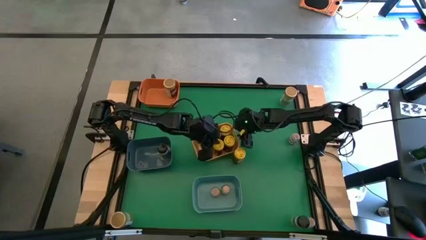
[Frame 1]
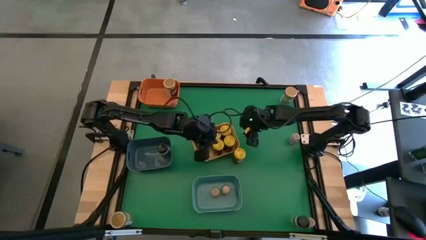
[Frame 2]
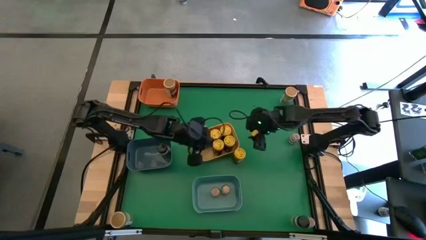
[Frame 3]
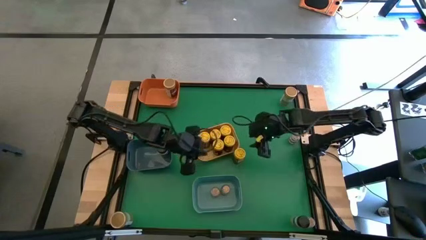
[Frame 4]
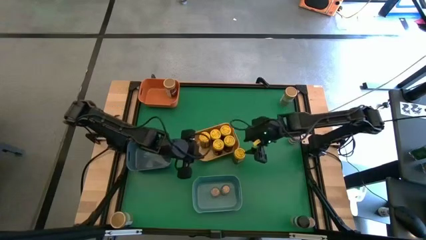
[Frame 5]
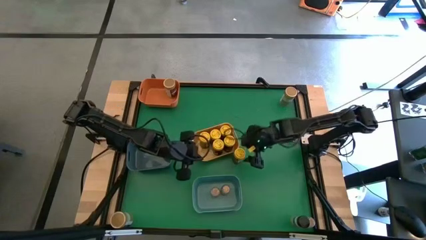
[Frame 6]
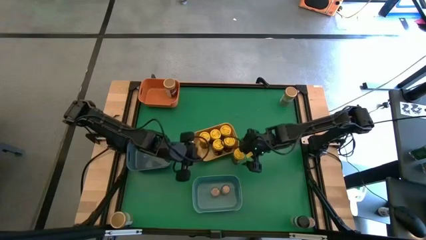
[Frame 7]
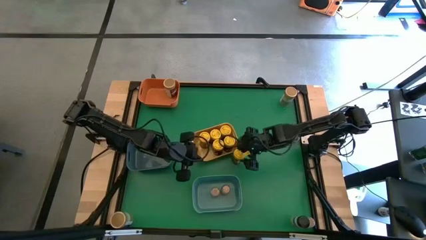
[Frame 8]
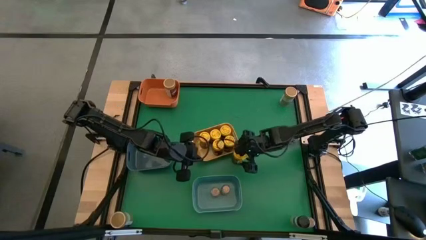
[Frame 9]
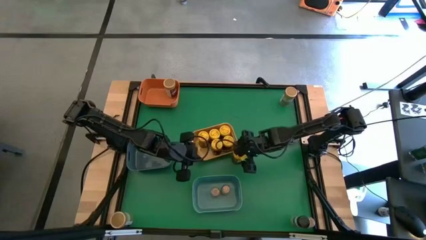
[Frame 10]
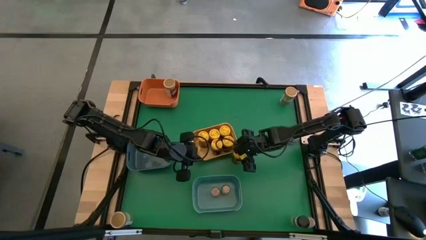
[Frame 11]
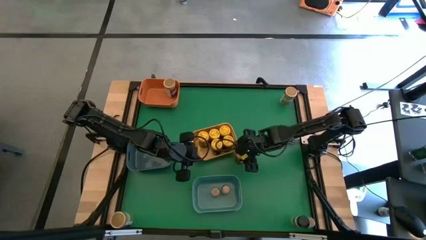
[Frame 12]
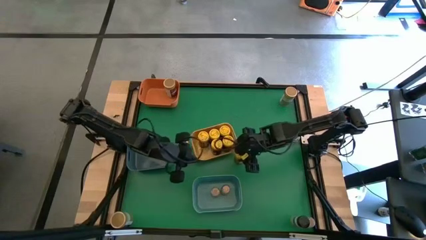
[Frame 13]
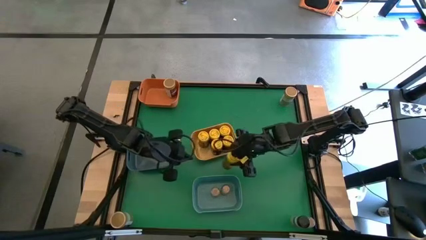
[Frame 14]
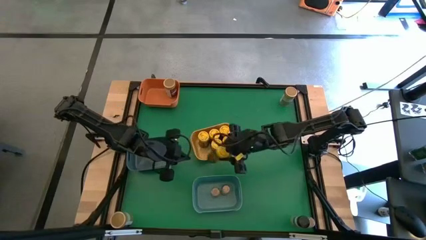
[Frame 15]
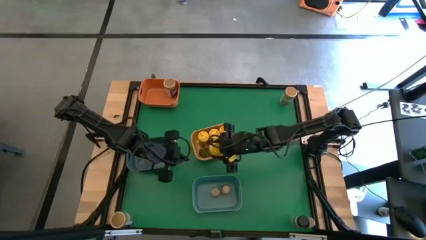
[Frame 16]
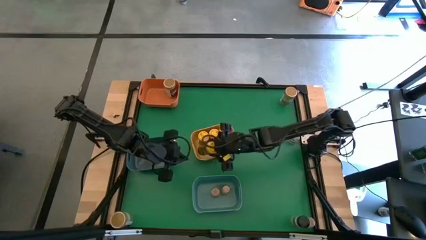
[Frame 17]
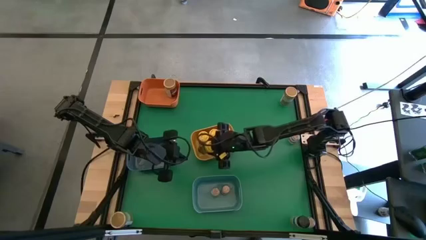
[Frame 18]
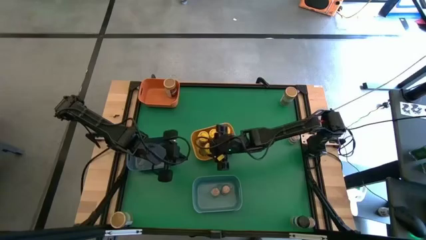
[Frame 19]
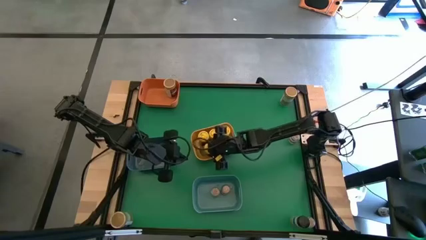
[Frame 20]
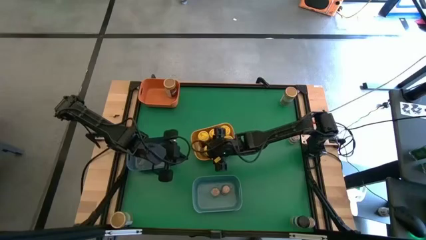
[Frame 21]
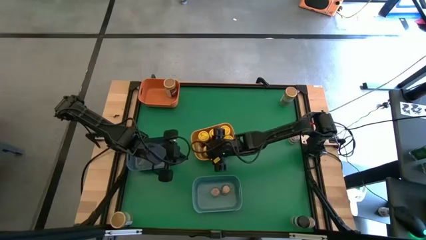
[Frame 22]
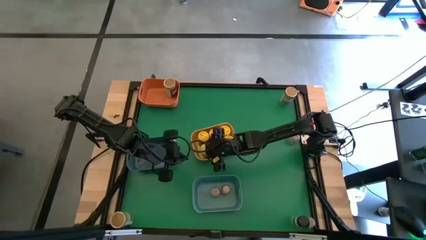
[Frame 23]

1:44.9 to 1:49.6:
Task: Sort spices by type
Put the yellow seasoning bottle into the yellow bin

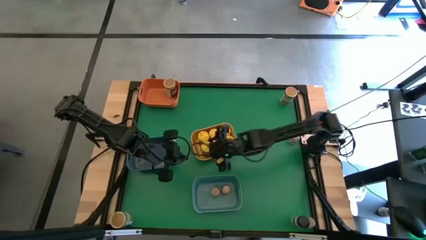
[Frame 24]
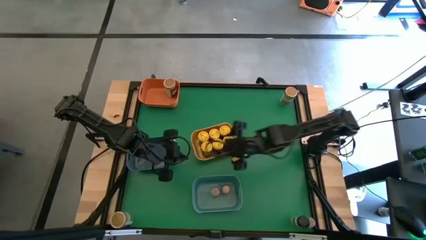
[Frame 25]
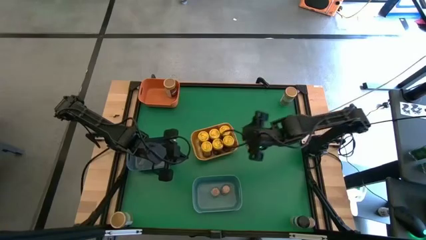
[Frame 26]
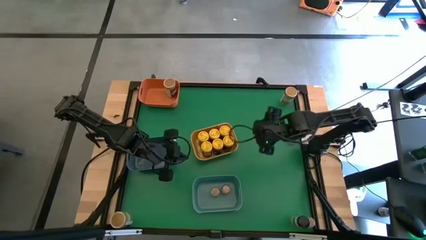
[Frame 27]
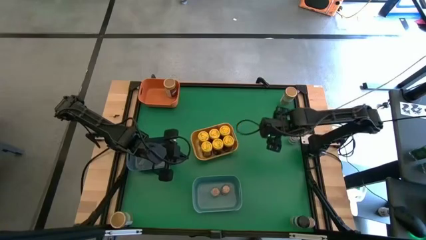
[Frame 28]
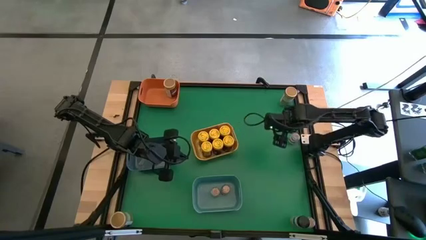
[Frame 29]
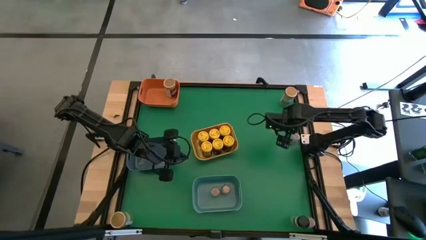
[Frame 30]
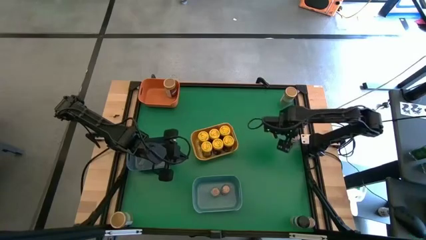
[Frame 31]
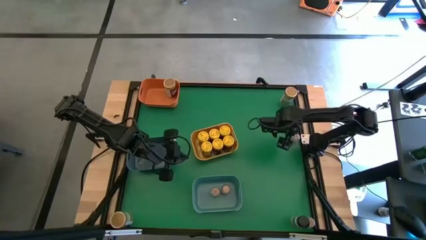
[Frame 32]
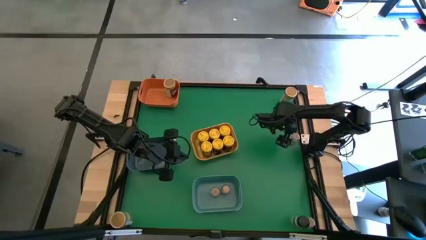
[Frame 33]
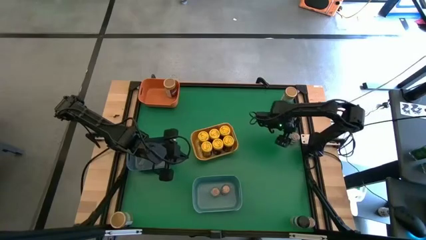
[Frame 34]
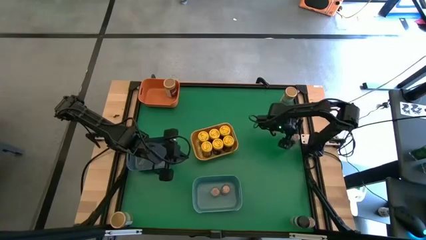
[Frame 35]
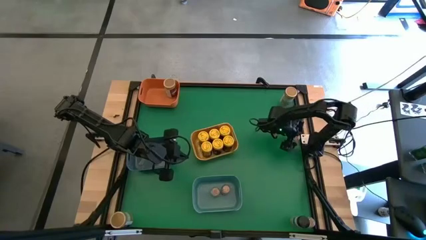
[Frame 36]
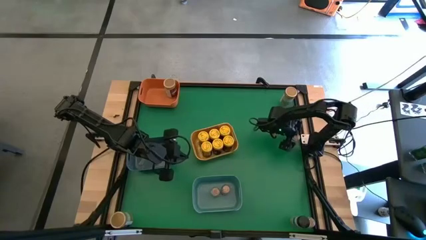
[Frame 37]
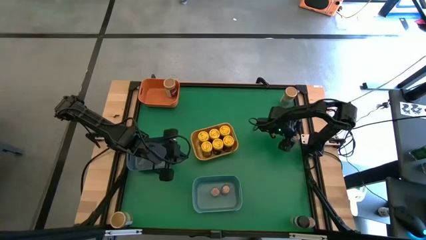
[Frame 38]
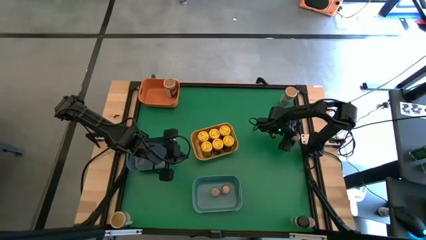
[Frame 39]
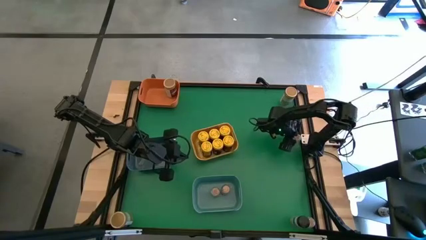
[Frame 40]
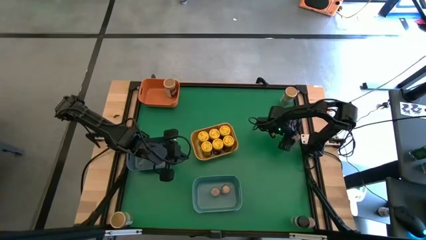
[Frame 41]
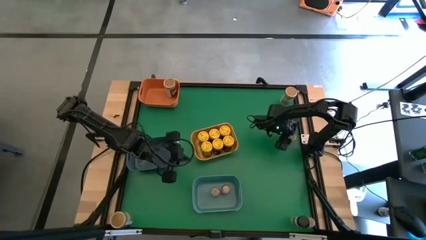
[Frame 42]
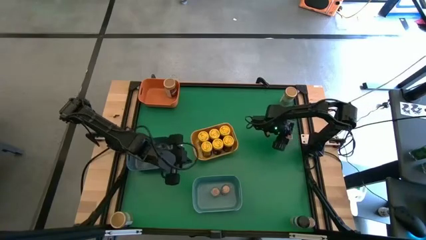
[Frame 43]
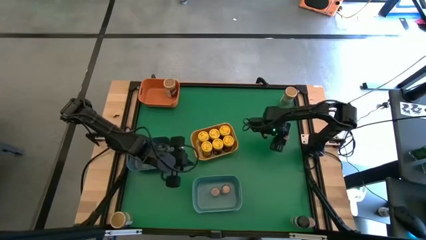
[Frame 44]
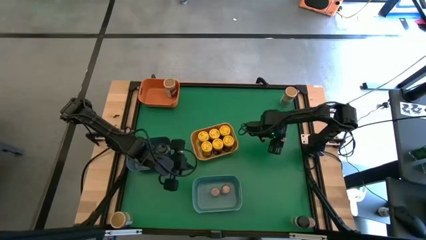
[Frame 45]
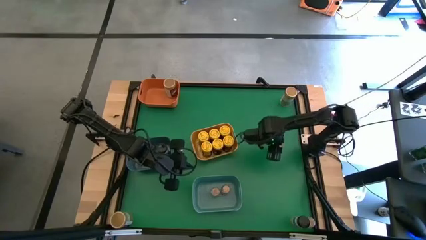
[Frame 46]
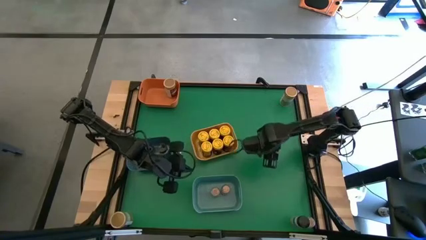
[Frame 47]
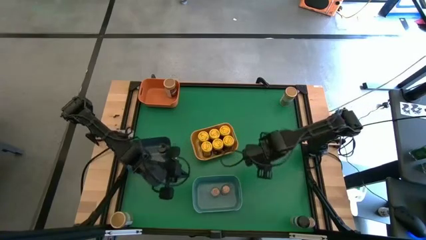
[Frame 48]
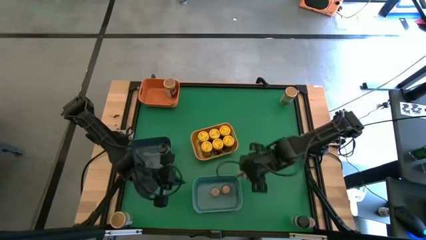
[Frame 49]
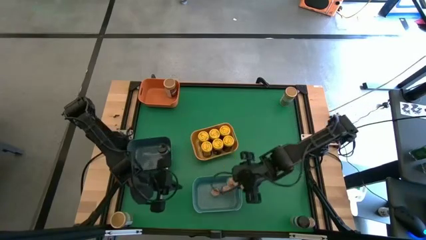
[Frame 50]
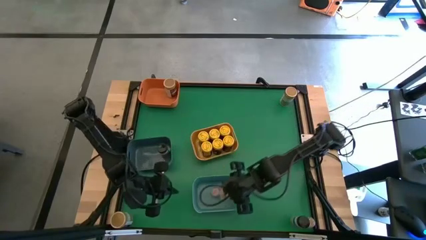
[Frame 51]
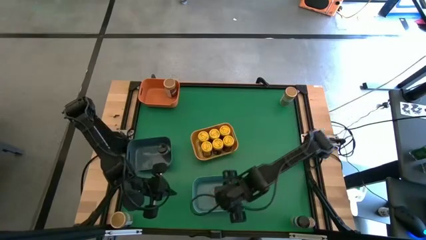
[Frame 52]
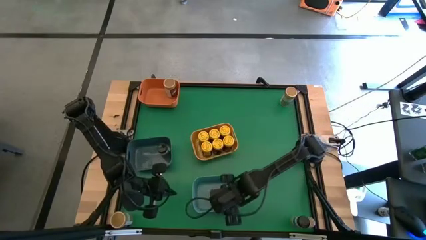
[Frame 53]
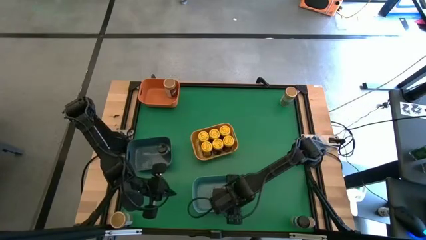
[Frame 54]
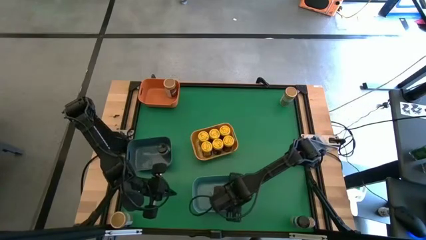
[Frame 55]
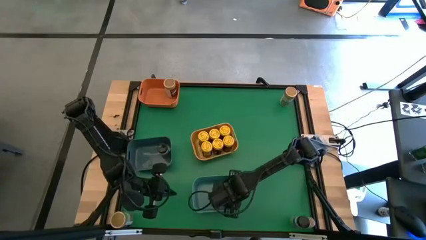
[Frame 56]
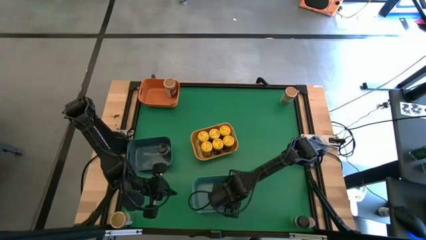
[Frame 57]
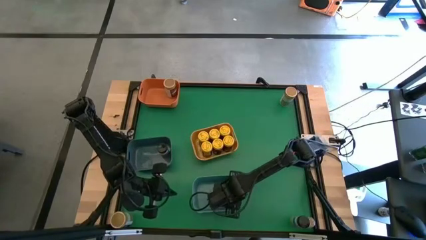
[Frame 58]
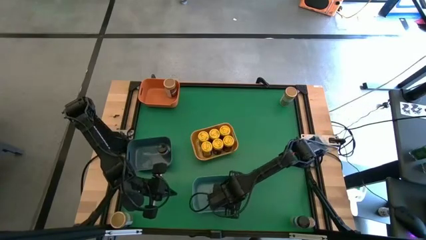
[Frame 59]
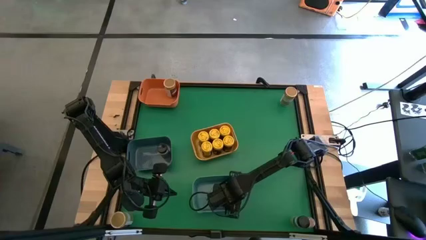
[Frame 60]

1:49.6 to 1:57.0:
Put the white transparent seasoning bottle into the light blue bin

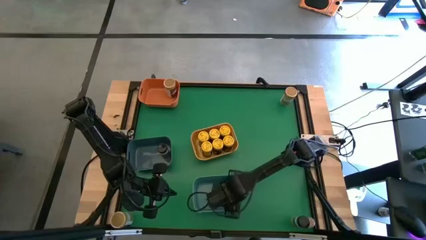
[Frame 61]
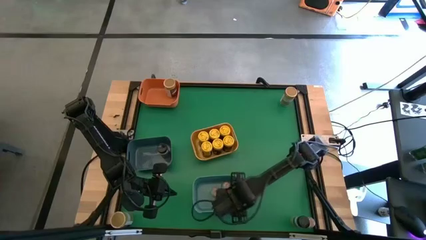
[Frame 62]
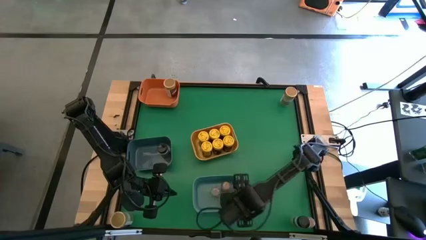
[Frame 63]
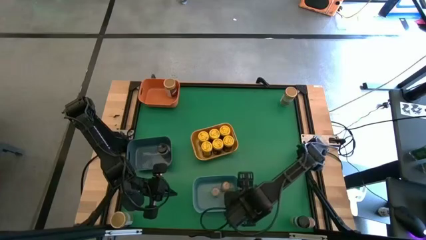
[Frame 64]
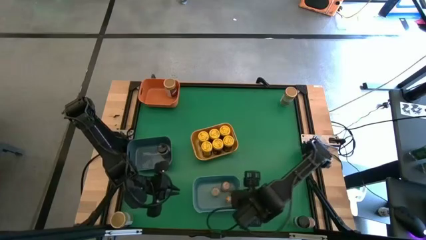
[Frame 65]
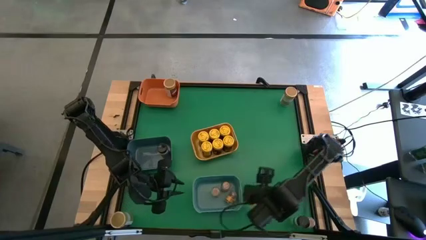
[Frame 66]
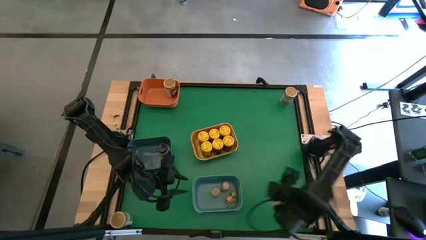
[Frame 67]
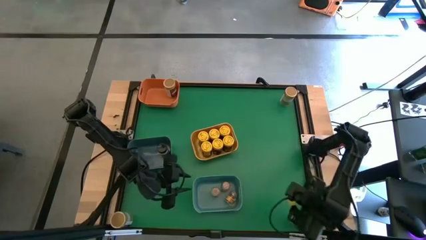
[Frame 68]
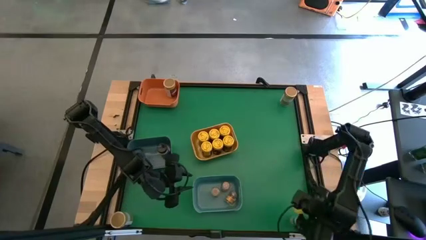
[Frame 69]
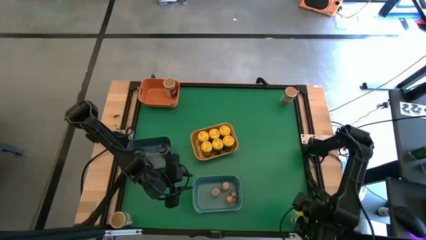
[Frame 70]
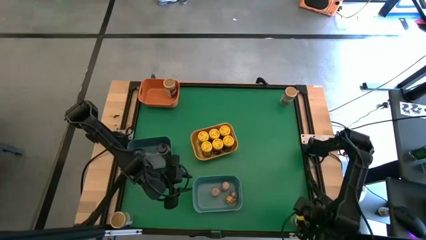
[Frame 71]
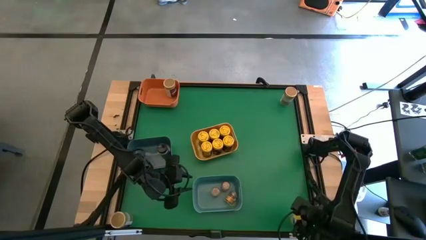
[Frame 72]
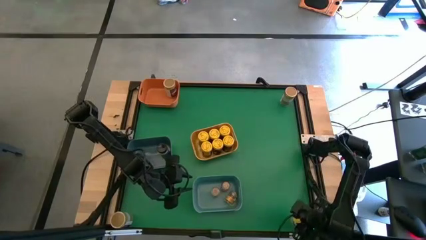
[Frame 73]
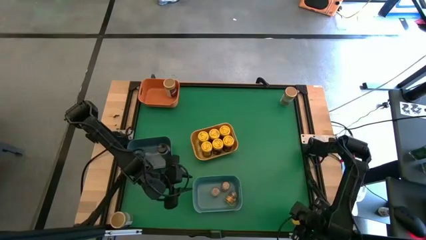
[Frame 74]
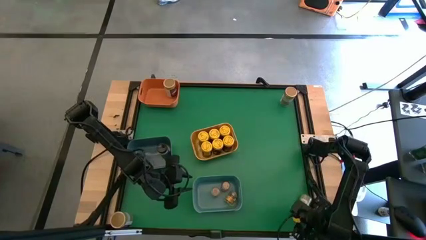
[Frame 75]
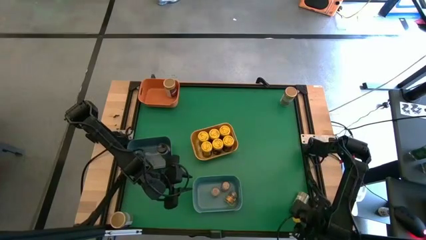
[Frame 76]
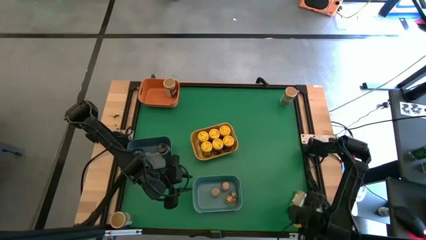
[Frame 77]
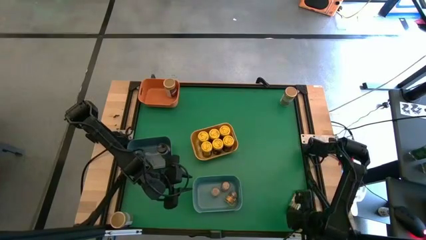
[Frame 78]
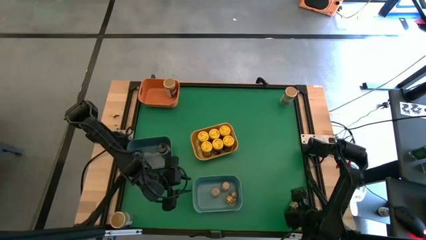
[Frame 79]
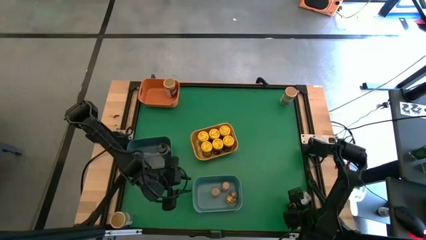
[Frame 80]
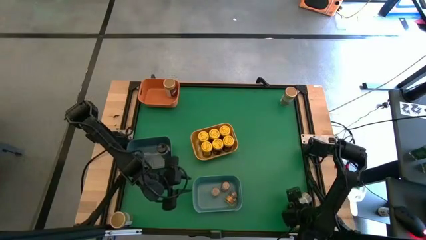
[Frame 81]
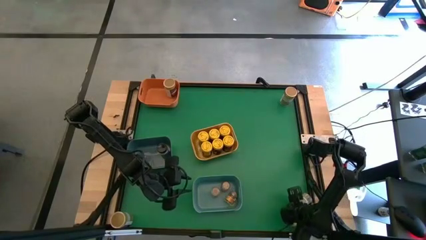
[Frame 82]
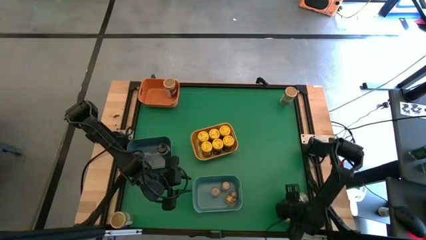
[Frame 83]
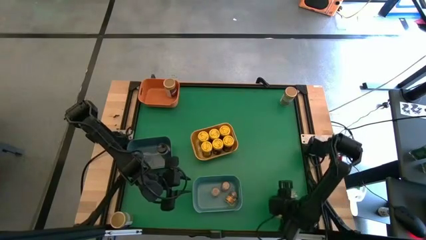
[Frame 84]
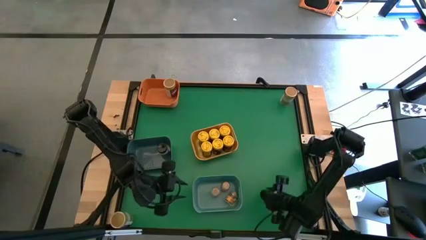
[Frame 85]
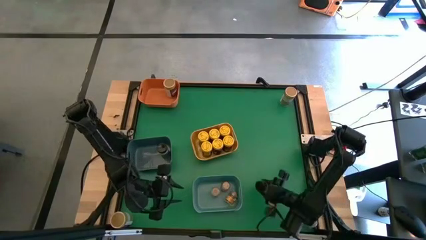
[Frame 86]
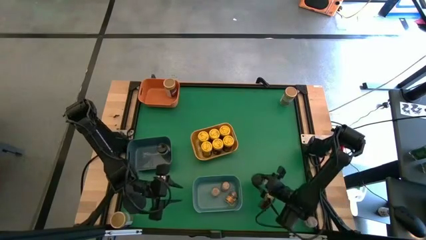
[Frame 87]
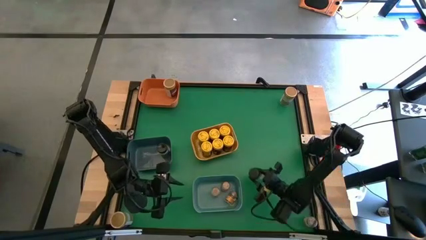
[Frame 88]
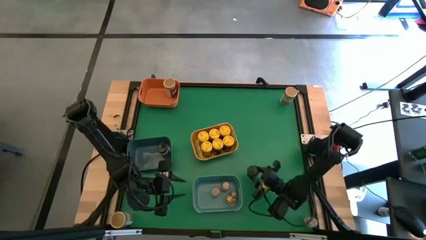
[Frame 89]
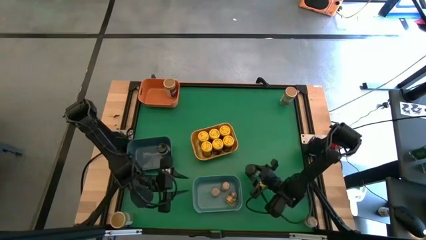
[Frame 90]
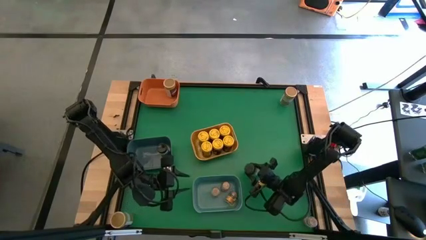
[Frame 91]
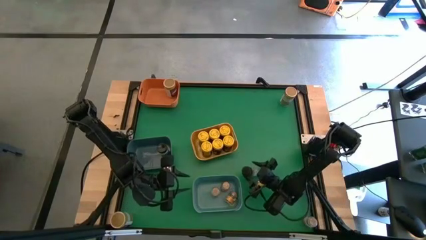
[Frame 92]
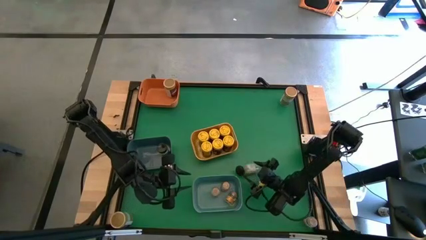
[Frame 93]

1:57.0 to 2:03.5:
Put the black seasoning bottle into the blue bin
